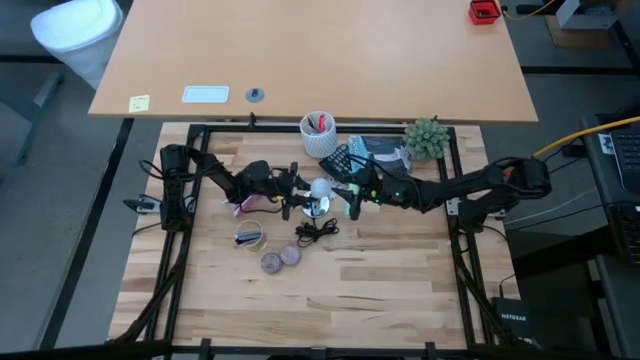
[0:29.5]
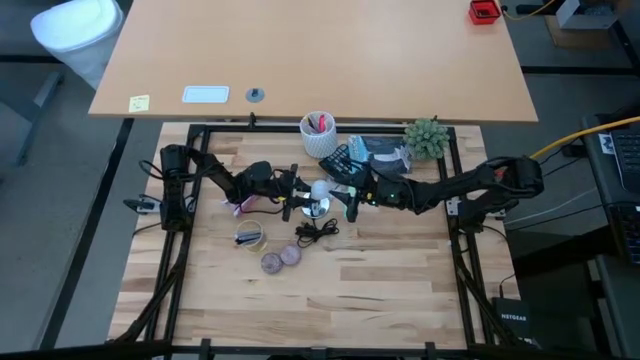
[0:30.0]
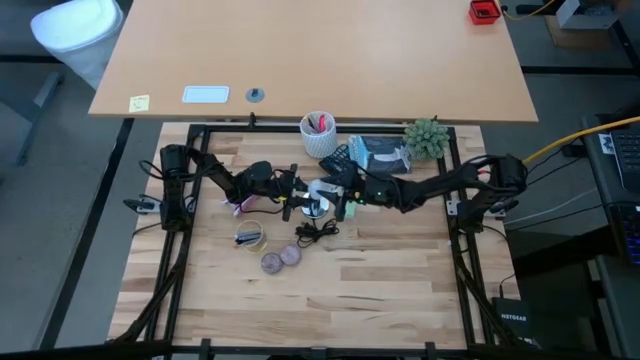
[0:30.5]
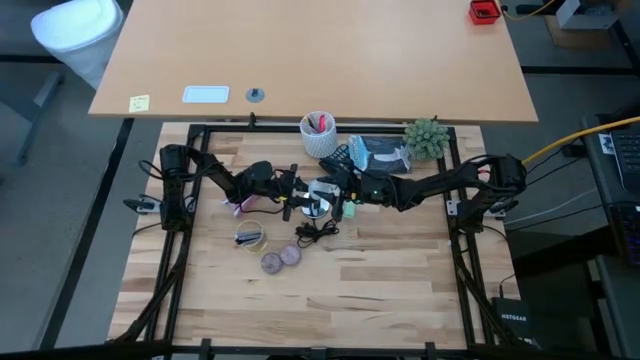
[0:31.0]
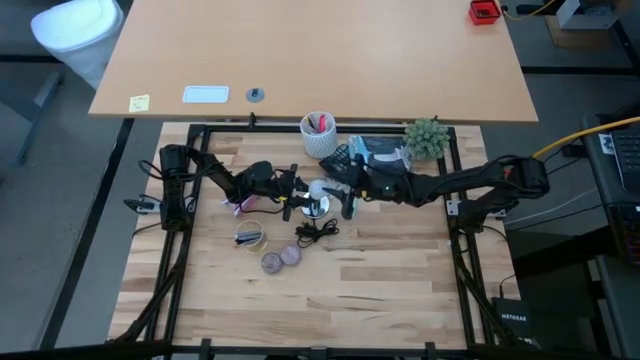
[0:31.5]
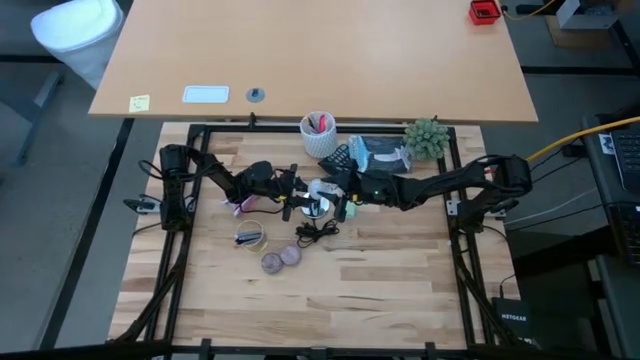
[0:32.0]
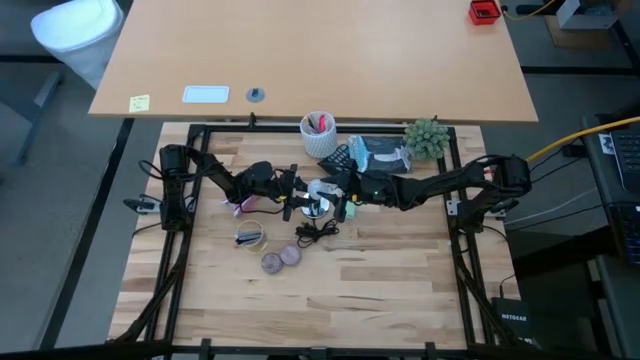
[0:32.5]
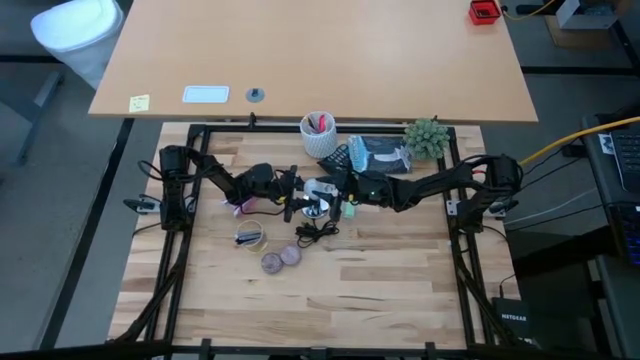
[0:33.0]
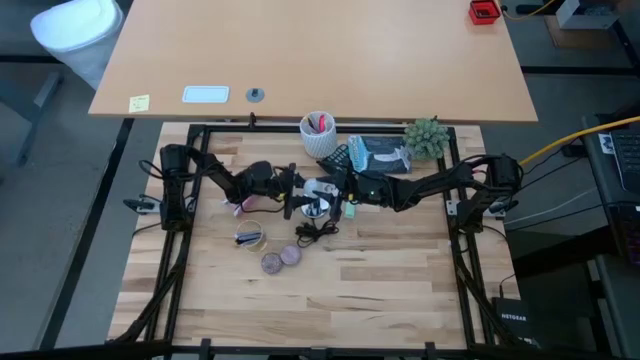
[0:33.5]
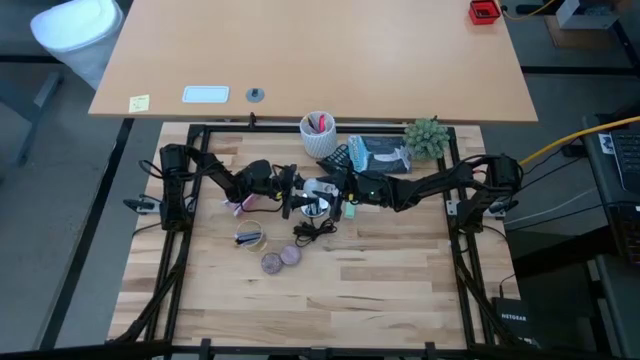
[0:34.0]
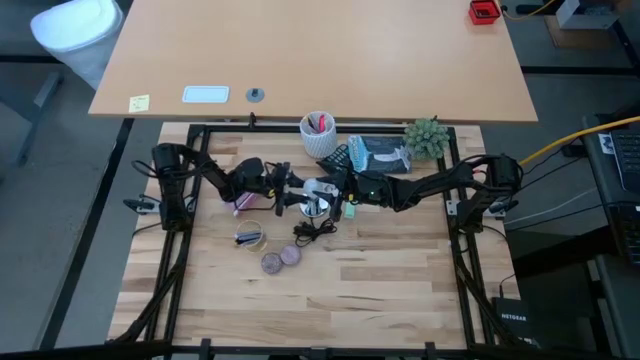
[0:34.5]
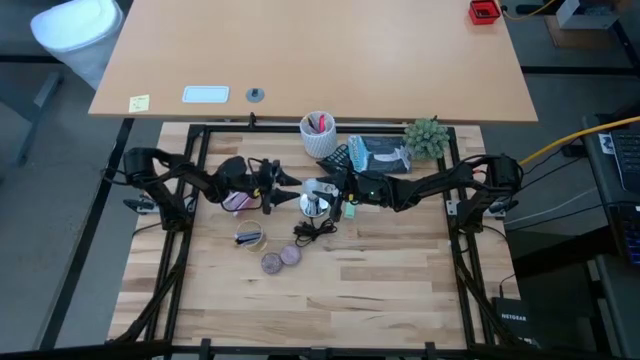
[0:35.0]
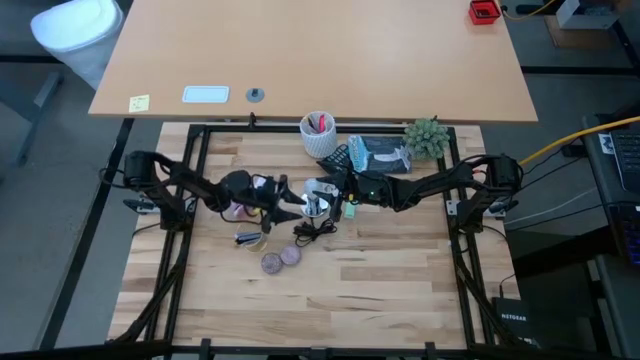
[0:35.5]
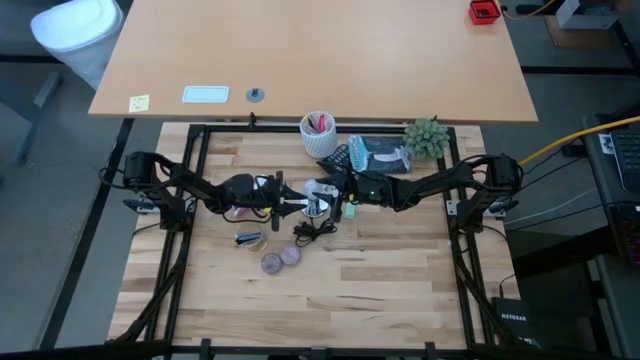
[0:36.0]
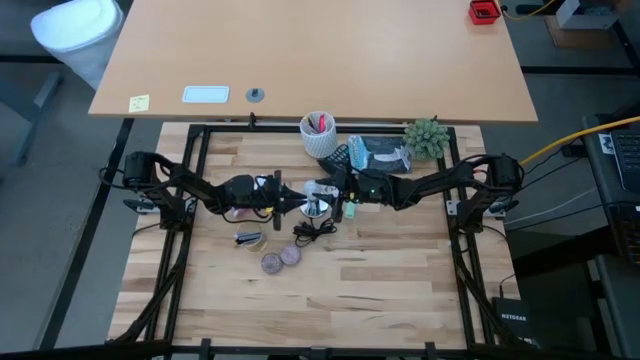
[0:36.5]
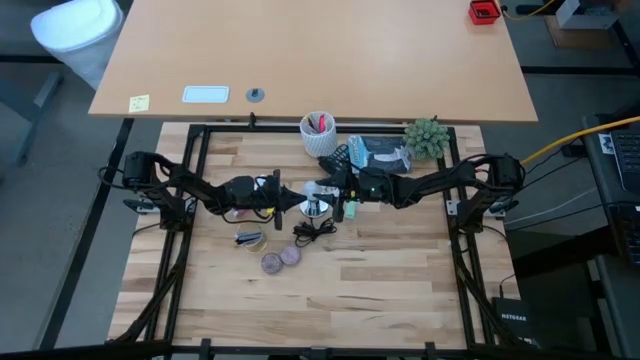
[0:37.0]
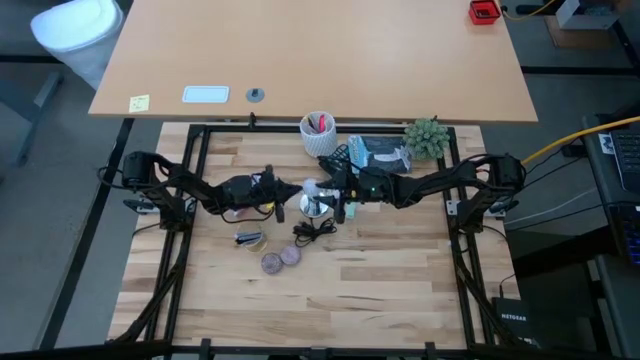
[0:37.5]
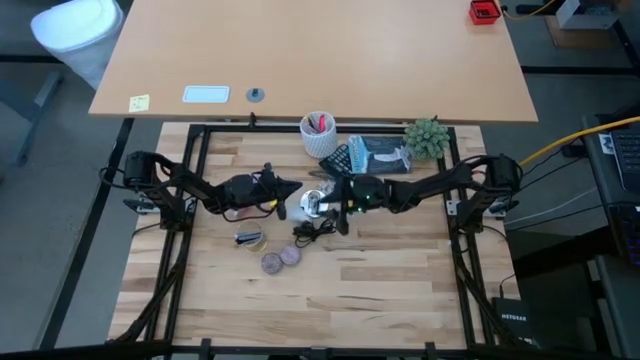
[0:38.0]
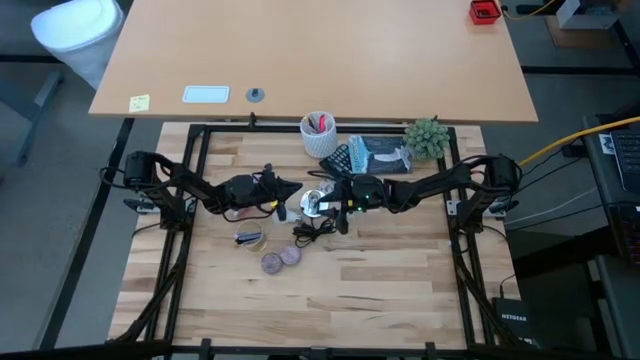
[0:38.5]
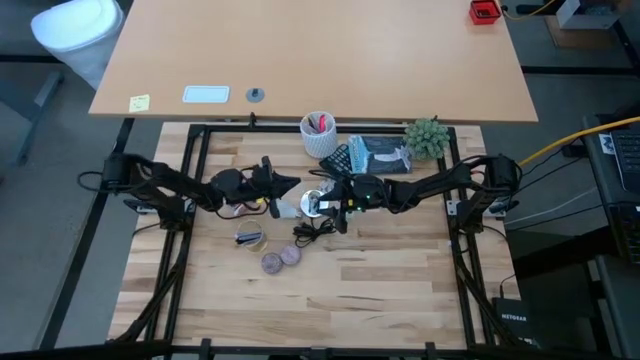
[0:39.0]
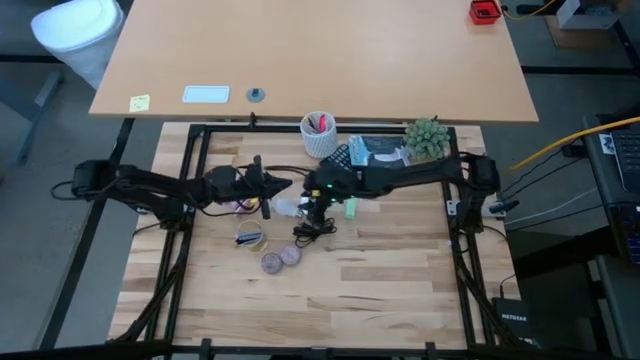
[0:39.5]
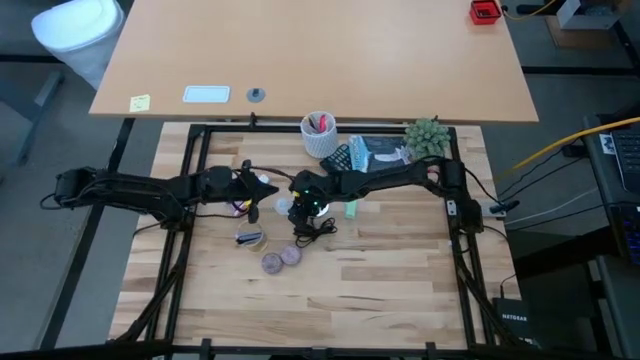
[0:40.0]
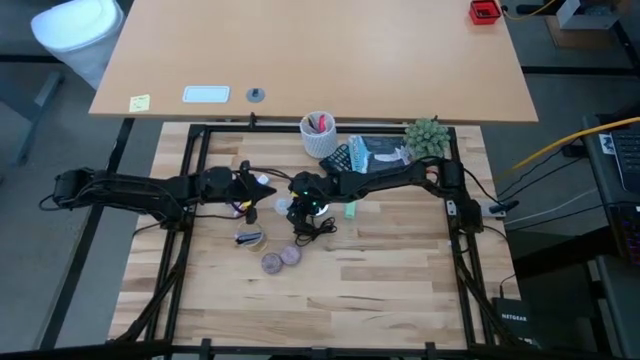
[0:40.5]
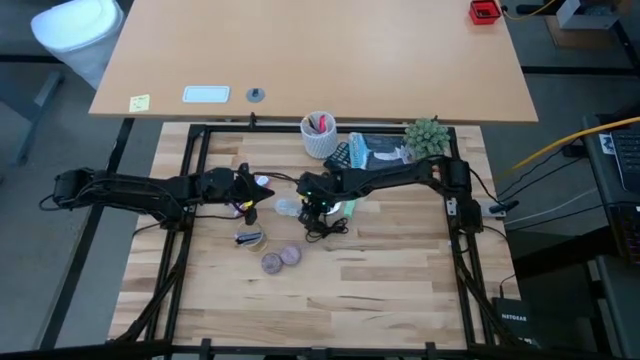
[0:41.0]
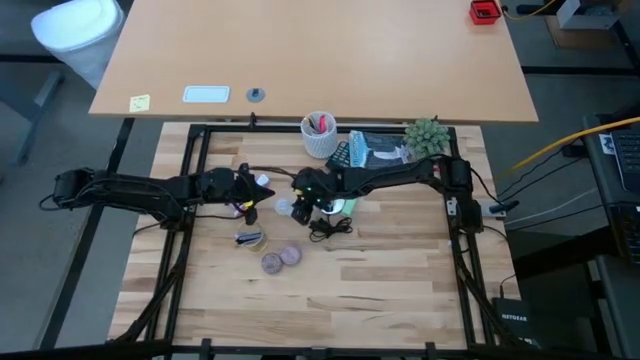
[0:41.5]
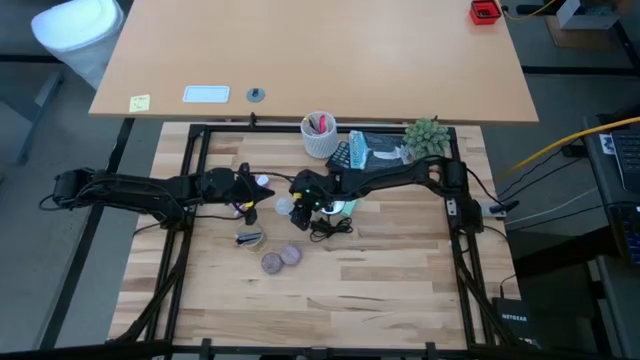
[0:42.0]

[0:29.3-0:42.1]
Task: Screw lightbulb
Insert the white lightbulb into the silver lamp
